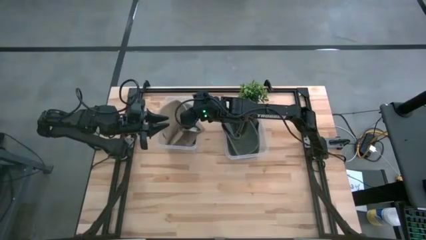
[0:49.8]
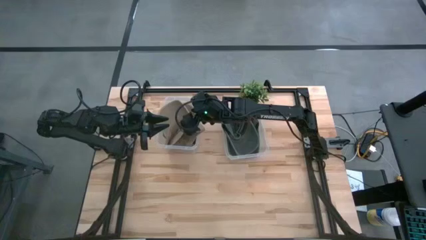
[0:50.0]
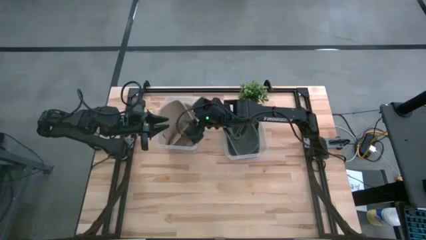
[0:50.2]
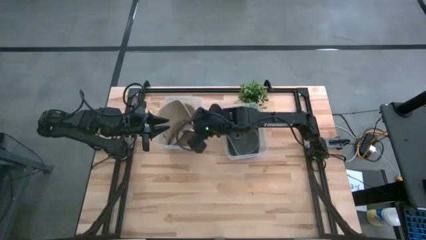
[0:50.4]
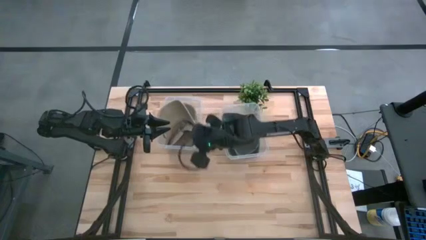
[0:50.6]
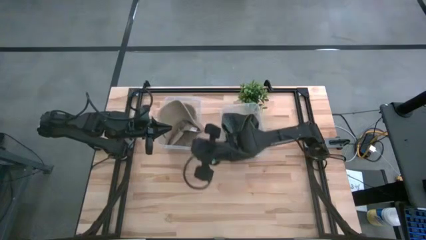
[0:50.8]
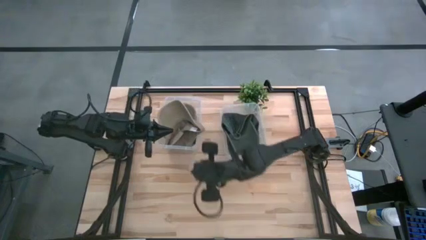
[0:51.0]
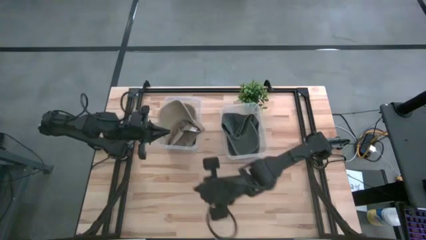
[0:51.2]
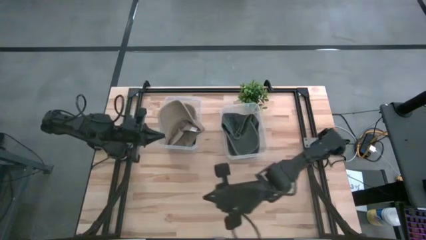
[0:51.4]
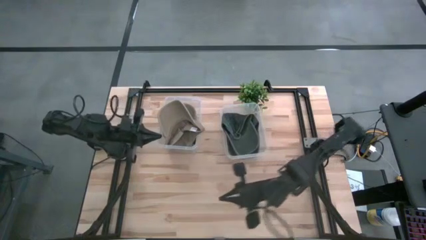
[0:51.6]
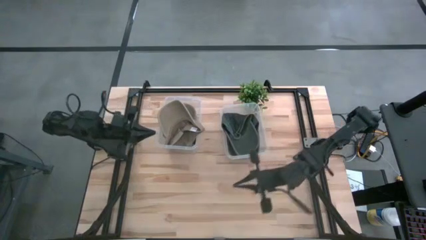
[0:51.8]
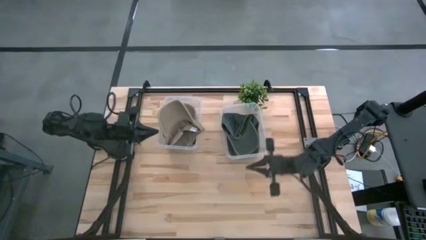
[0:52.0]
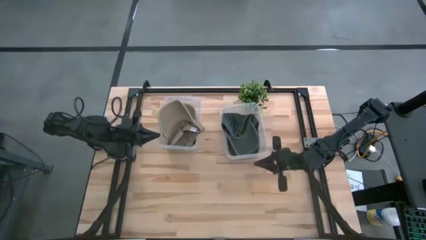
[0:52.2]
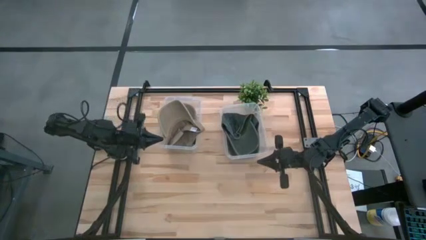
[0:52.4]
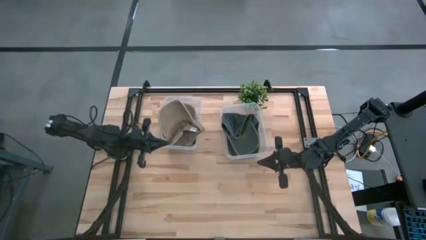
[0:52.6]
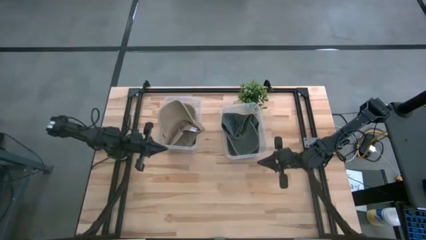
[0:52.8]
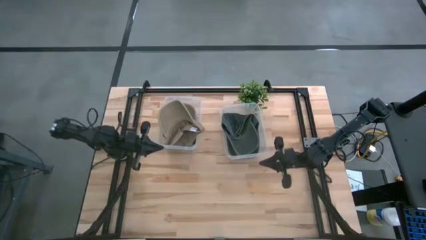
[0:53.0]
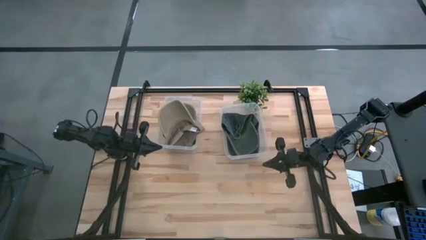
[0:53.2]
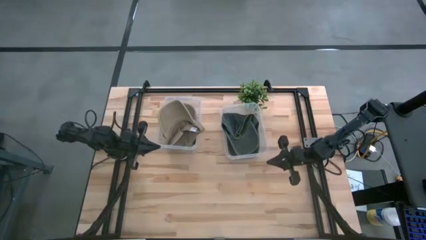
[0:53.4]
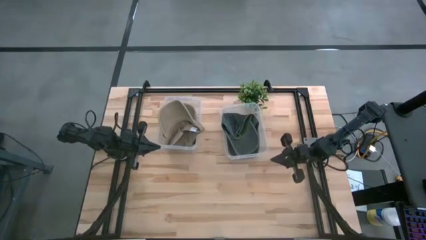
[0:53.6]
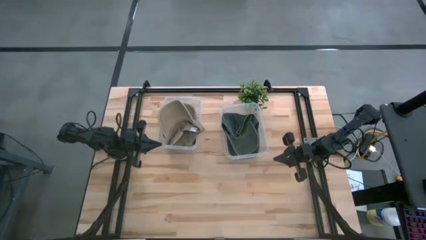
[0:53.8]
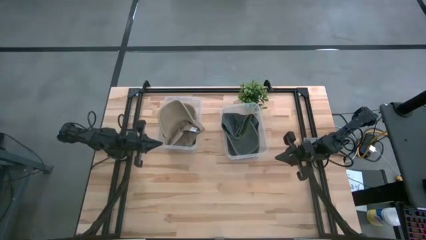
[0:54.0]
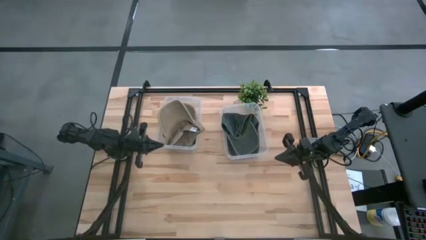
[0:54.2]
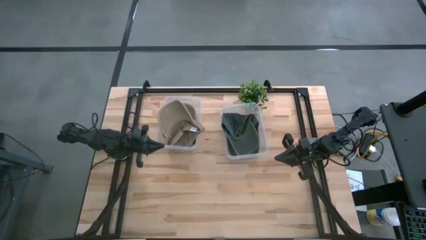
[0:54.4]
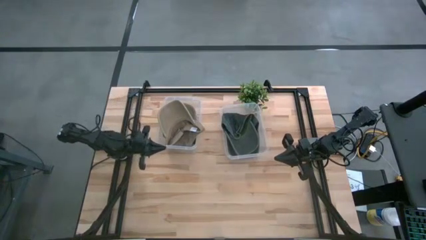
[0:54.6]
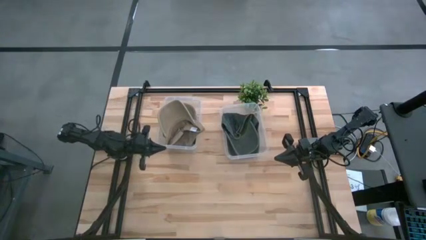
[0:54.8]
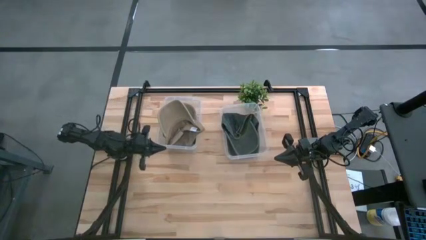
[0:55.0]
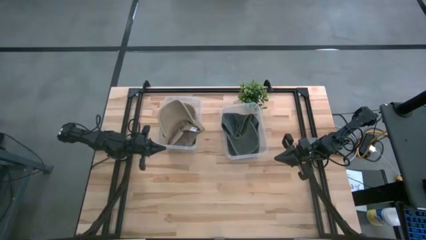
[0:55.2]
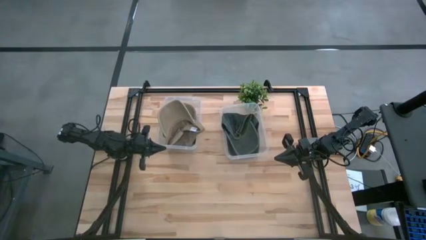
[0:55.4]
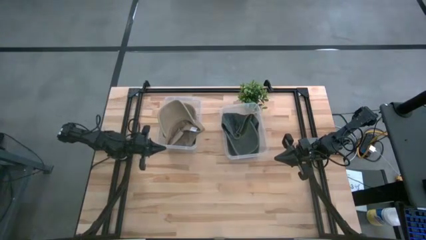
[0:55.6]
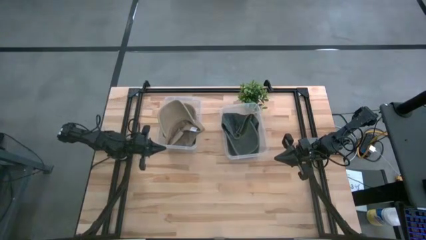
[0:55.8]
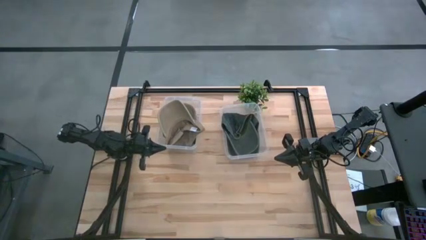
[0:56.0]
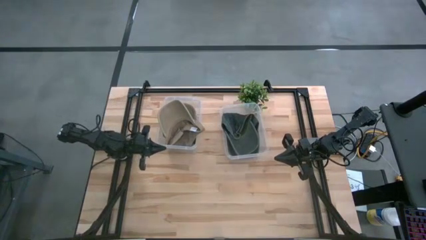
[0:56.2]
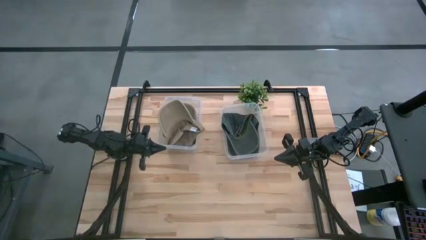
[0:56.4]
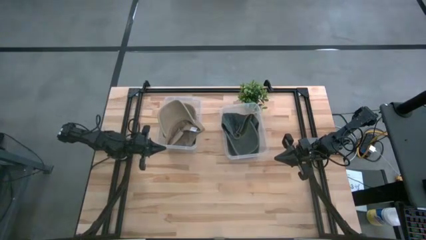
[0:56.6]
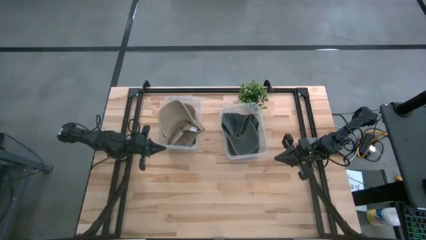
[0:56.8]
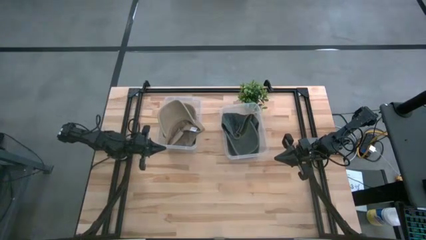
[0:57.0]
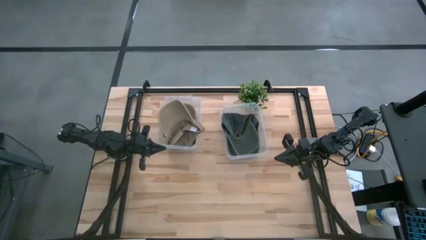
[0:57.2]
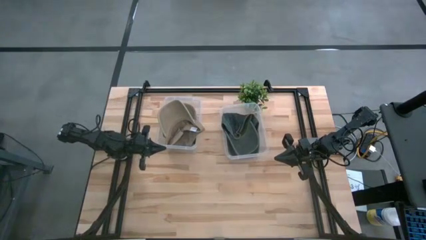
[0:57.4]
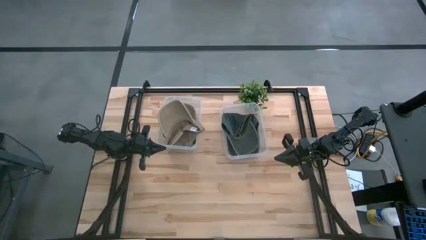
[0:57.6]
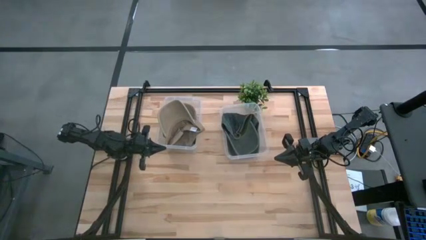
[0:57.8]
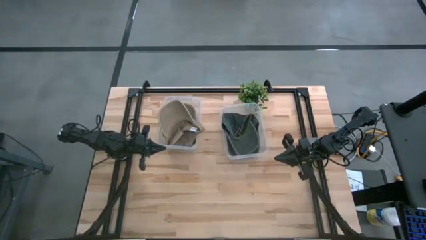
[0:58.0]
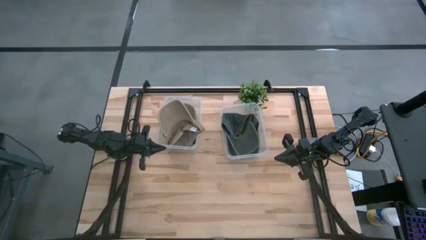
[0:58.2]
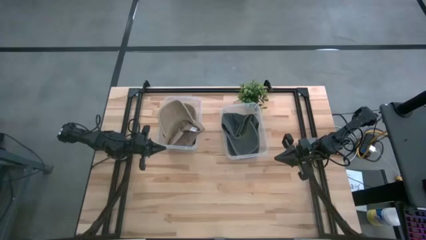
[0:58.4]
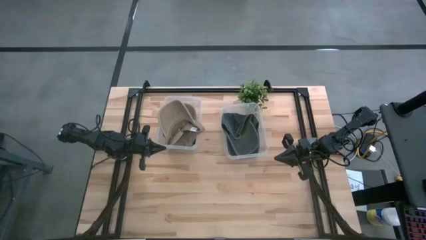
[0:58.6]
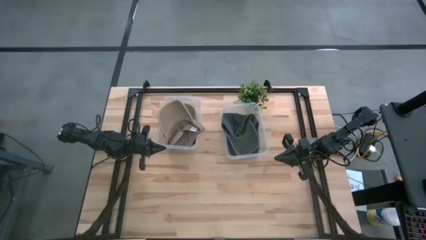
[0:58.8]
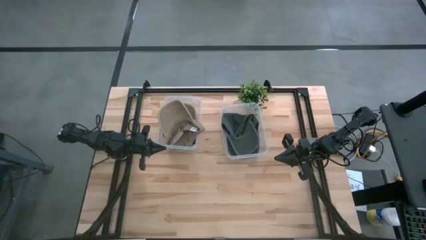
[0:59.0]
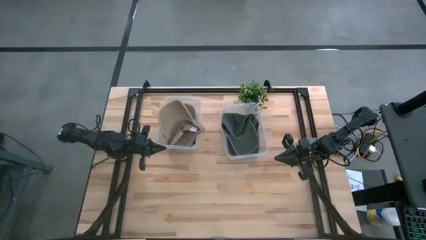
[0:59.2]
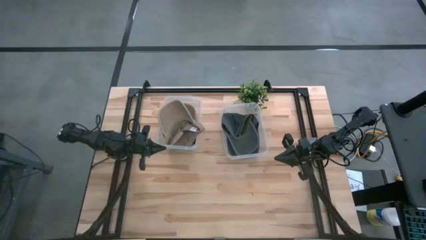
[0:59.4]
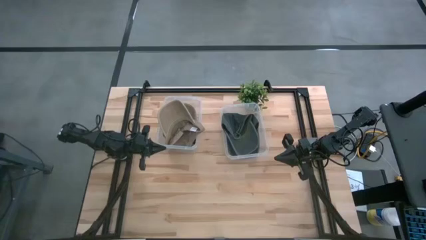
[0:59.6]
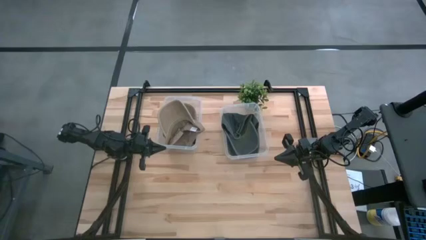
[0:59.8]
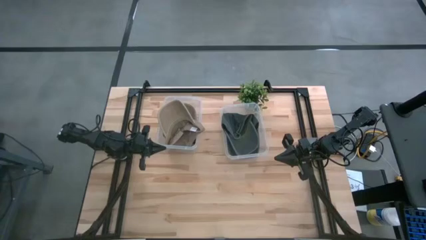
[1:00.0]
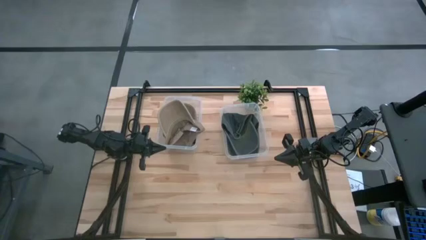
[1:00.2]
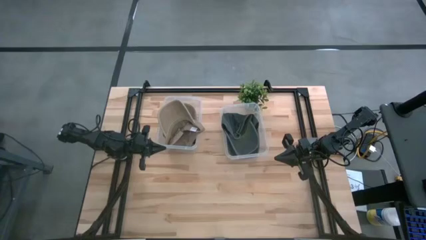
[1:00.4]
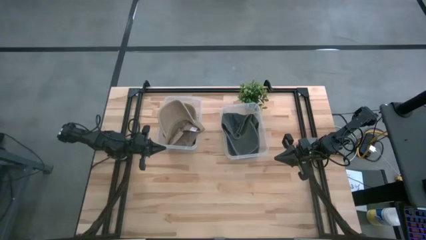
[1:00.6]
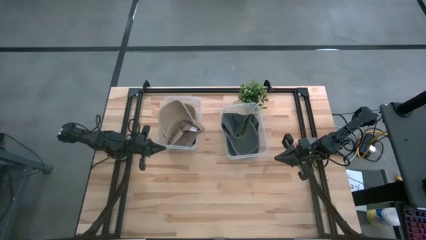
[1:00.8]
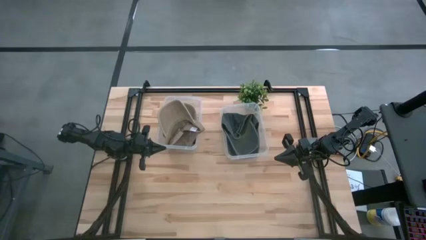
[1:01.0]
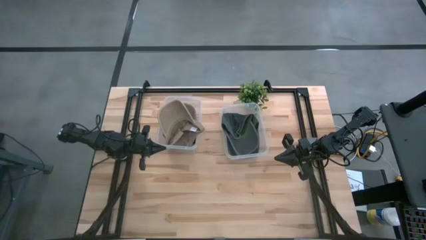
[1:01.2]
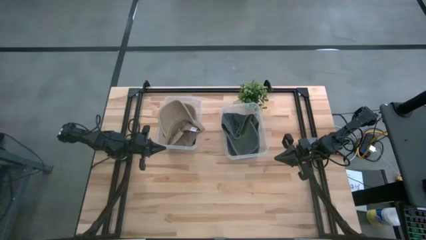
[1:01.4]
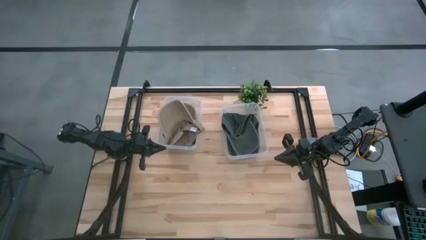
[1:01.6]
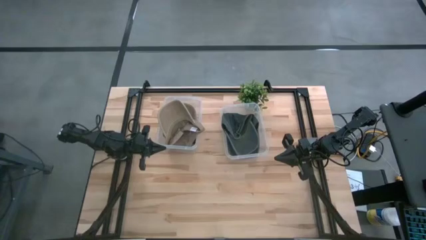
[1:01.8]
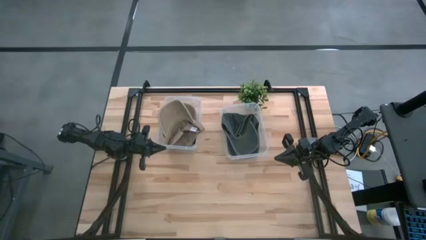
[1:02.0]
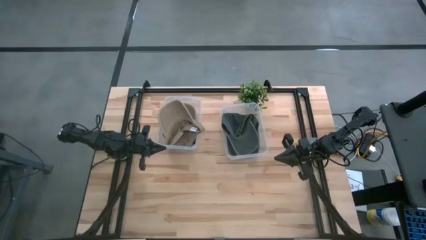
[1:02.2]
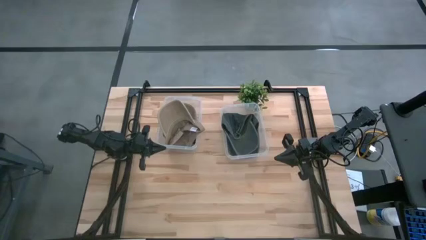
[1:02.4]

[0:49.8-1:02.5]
Task: Pick & Place hat
Return to Home Position

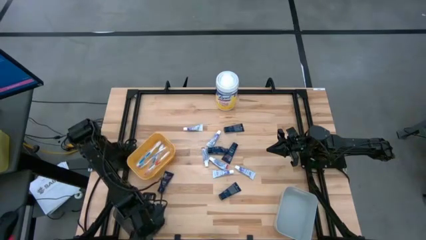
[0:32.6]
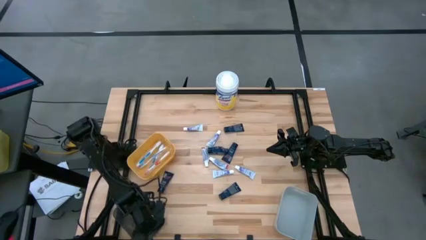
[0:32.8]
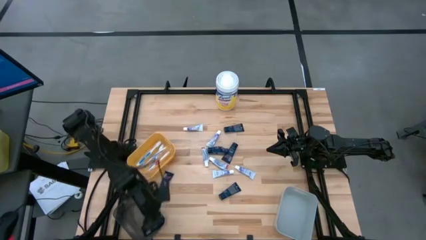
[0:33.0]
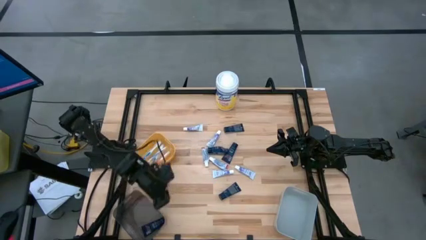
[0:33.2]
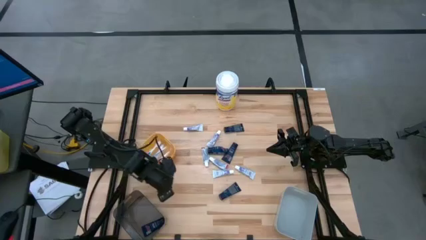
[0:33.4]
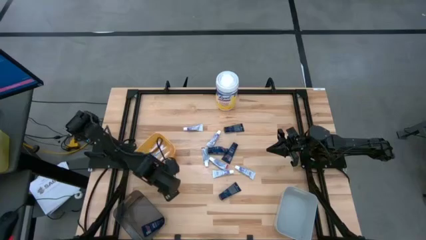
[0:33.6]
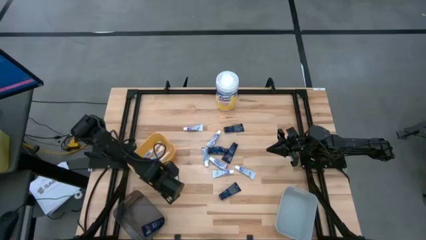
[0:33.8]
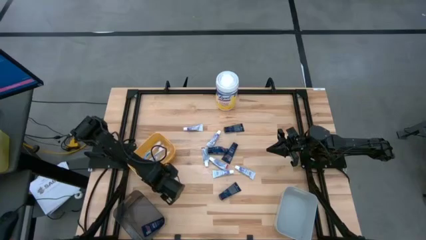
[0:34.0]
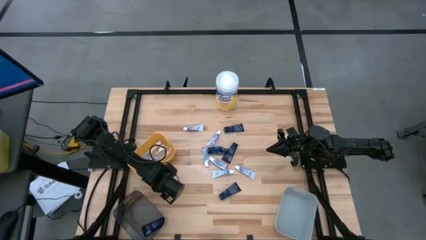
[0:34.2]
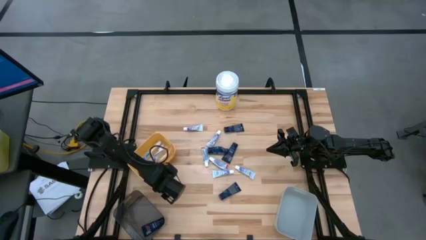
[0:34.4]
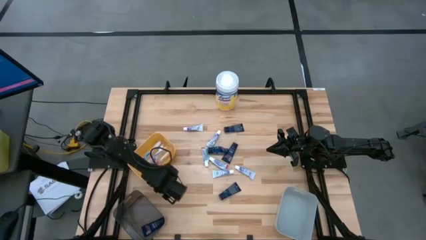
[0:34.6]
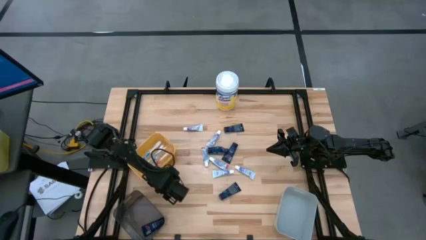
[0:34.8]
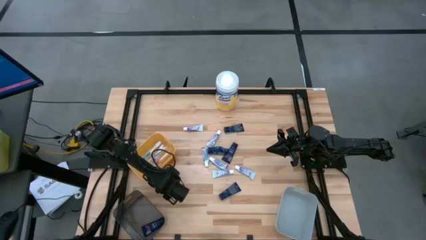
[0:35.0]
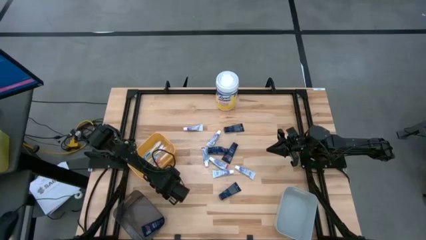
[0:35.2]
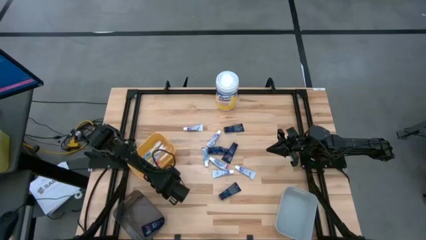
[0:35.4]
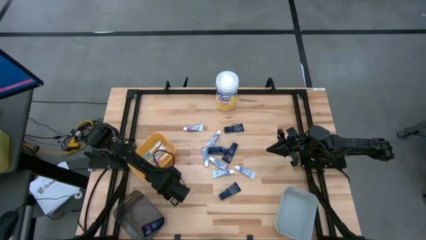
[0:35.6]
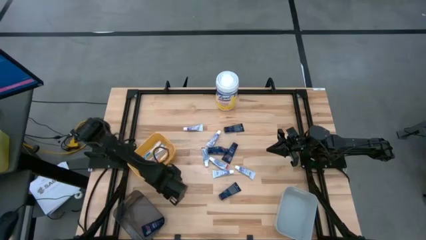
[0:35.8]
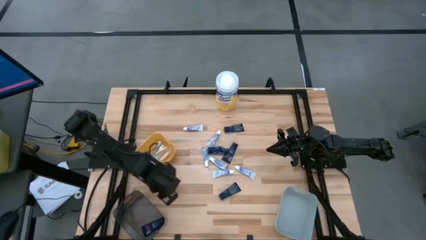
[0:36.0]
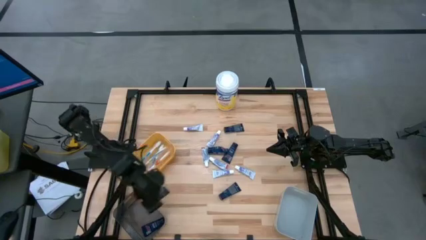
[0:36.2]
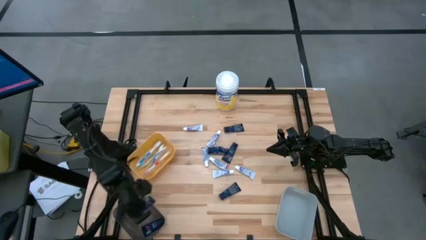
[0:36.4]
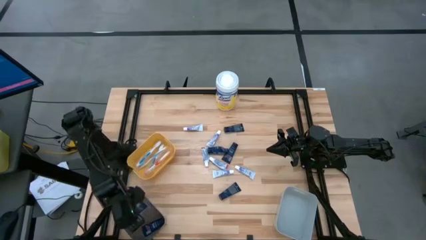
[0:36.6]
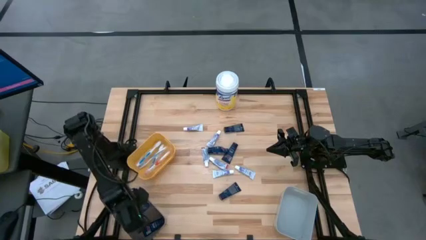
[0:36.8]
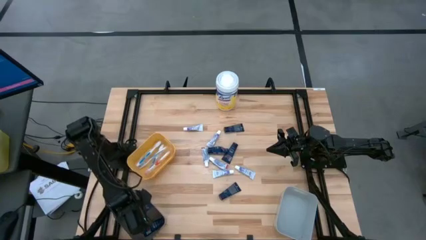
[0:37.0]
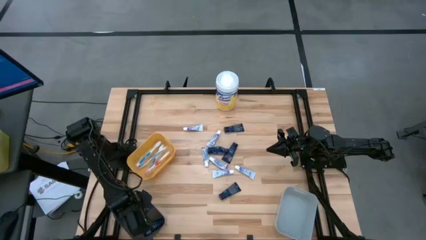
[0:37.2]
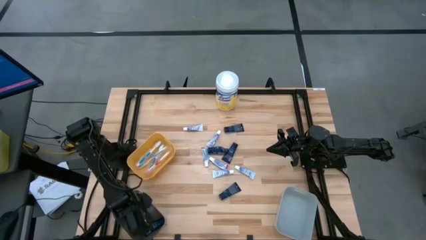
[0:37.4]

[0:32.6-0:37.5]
Task: Pick & Place Travel size toiletries
Put the blue shave cream into the black transparent bin
